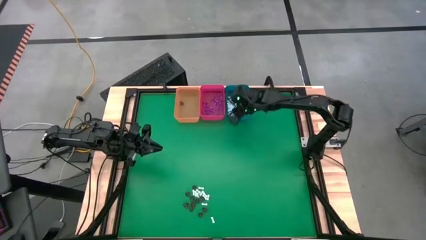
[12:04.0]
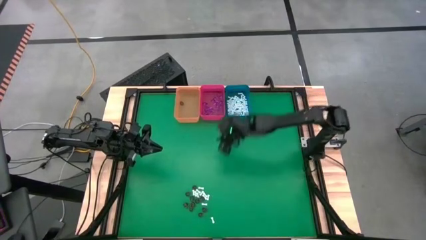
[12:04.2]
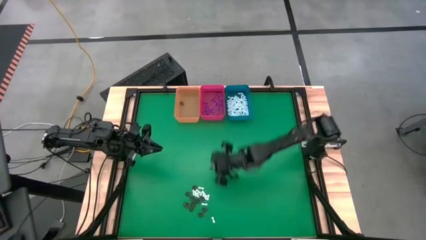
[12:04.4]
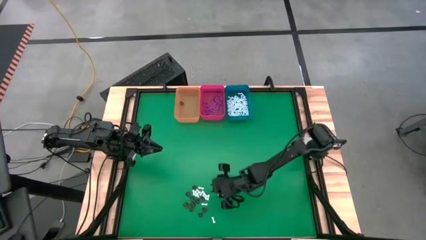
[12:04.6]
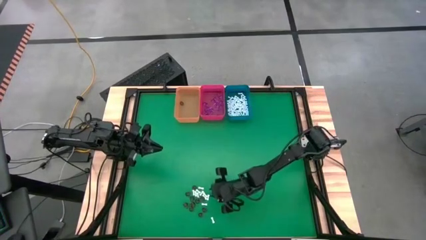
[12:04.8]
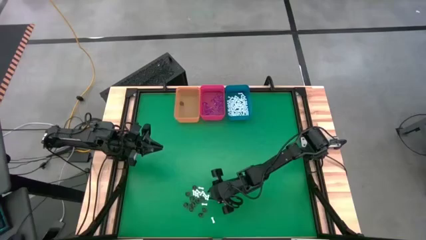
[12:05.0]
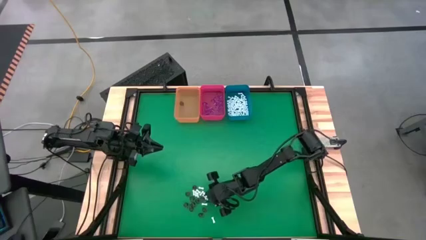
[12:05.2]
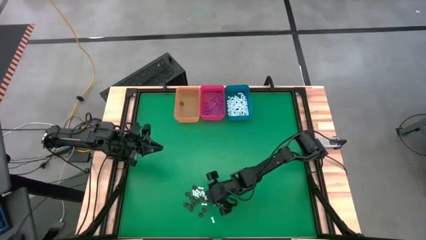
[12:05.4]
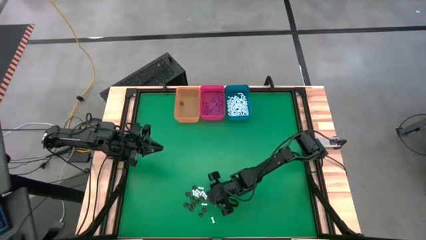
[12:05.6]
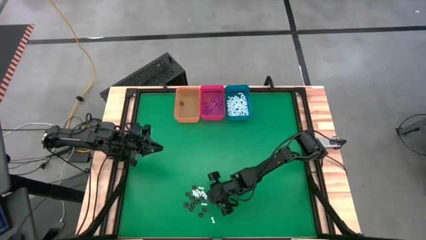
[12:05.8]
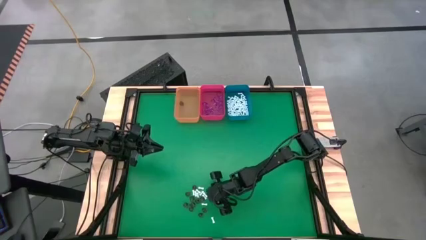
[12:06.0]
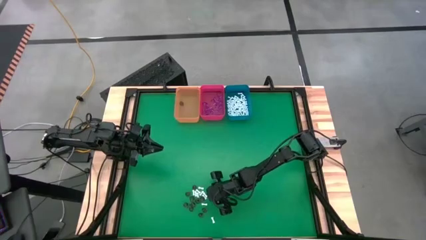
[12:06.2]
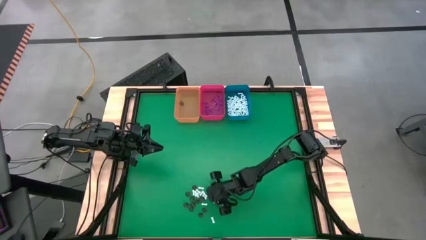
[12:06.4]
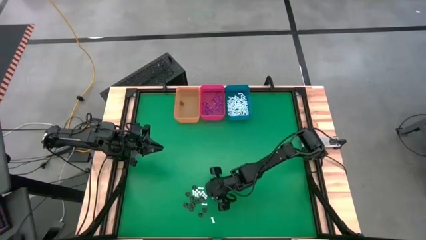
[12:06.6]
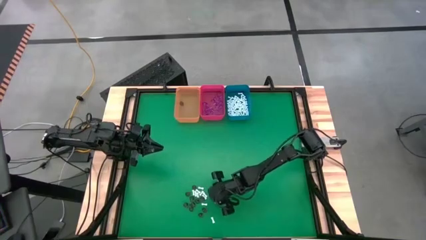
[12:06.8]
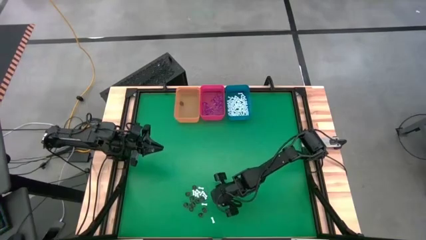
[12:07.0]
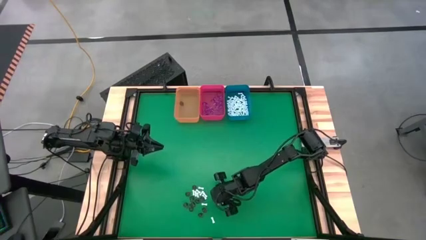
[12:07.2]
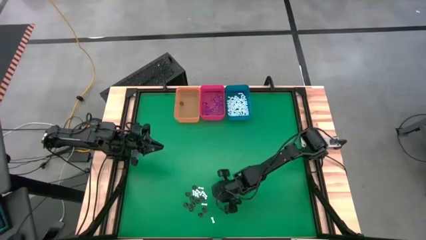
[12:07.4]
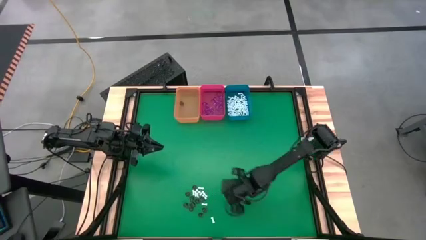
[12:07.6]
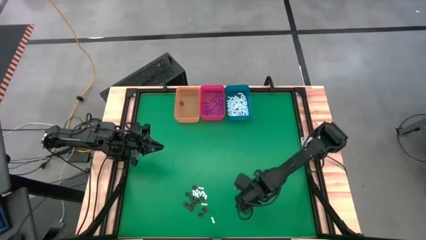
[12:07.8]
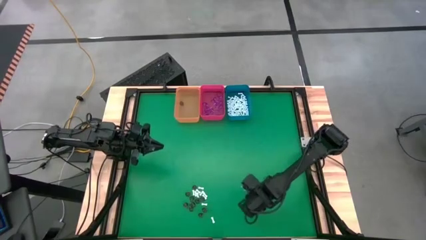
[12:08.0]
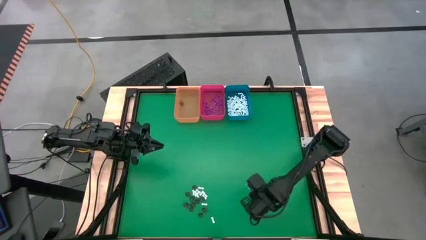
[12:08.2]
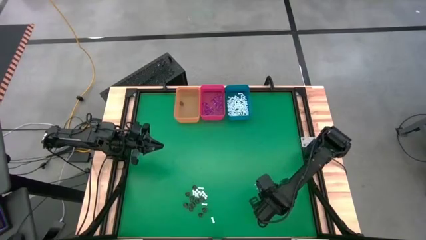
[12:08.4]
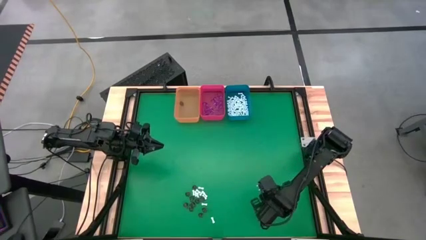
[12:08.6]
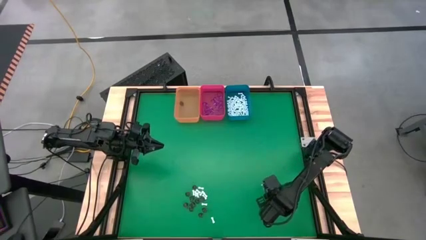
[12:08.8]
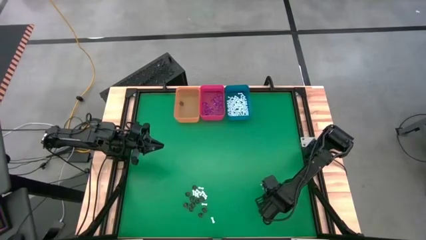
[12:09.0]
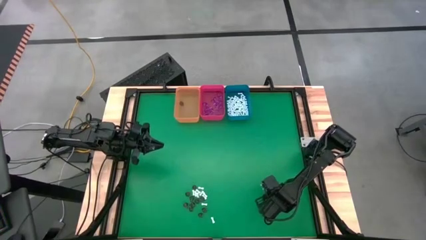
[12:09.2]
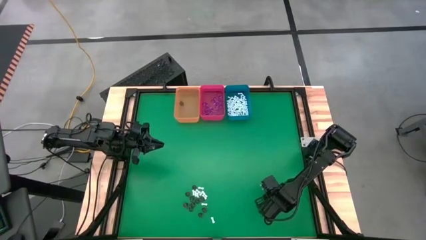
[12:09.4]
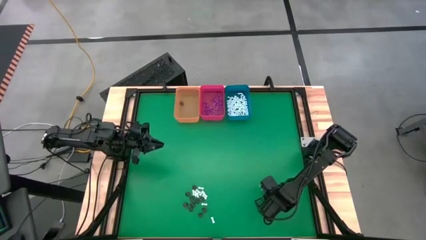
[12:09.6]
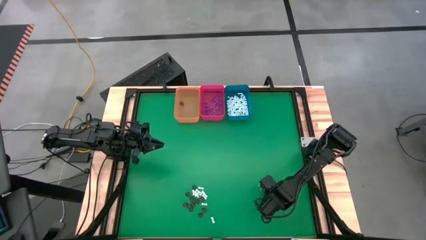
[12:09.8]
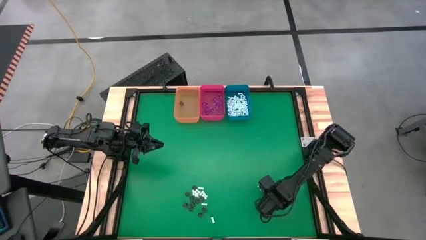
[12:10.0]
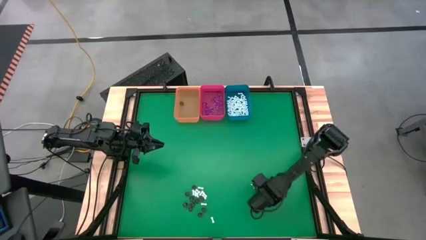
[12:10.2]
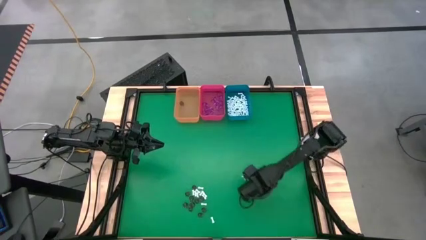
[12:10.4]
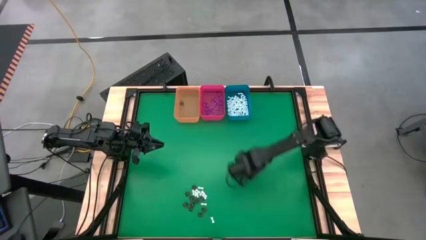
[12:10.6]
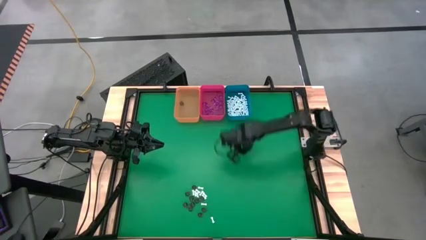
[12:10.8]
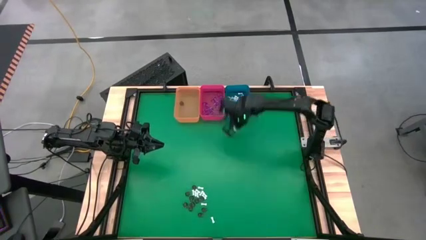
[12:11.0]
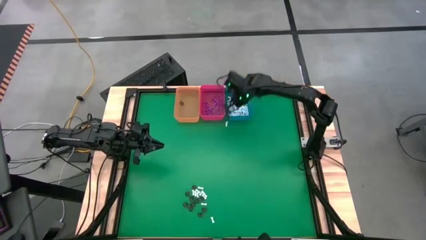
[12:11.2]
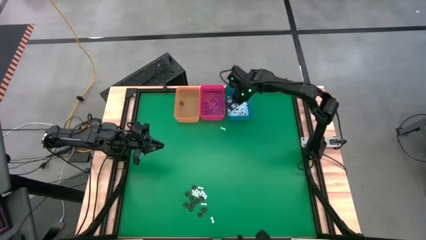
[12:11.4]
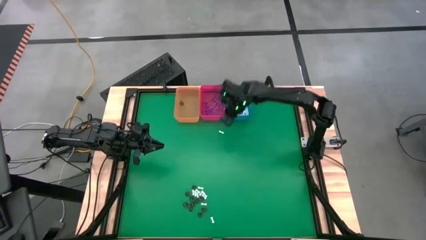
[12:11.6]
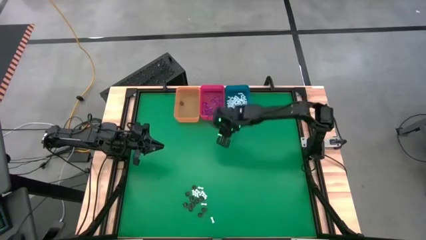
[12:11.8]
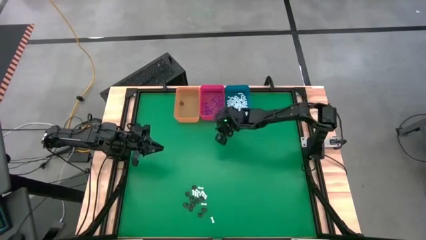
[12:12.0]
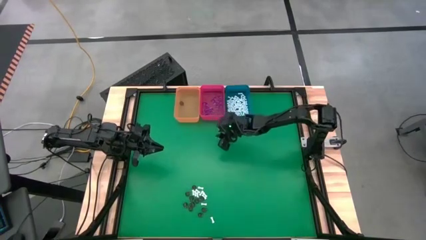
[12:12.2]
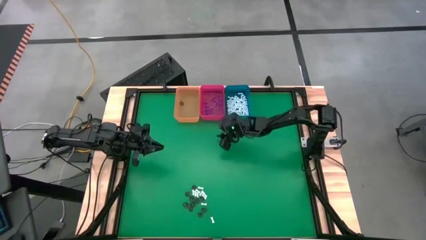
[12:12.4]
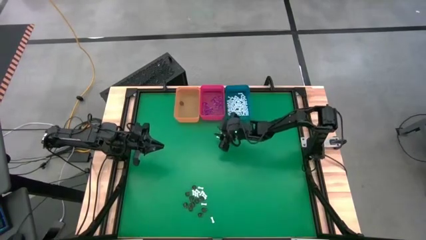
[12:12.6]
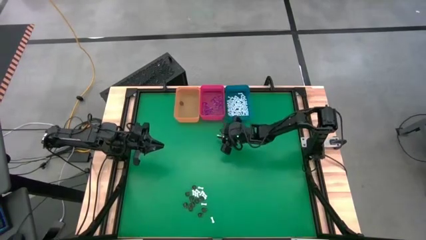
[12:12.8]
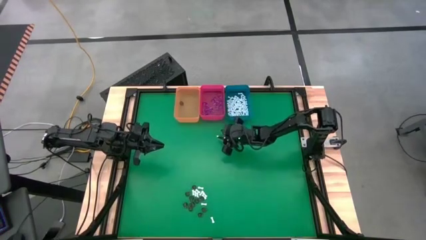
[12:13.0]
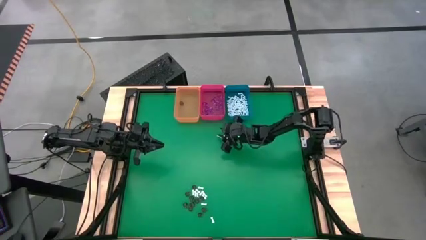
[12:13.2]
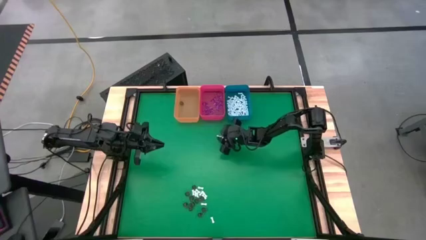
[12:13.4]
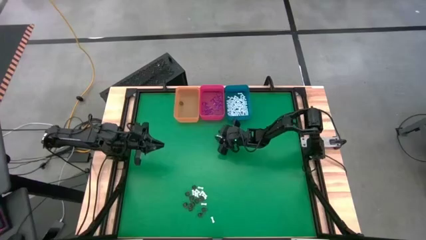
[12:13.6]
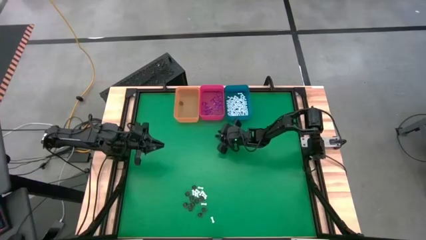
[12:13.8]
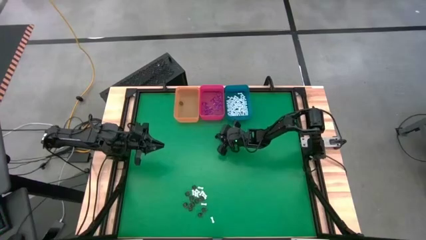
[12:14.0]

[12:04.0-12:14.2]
Task: Sort Halloween decoration
Put the white bone toy into the blue bin

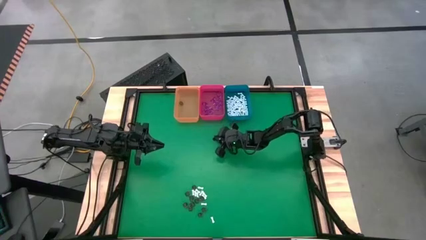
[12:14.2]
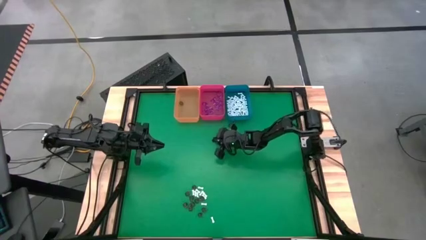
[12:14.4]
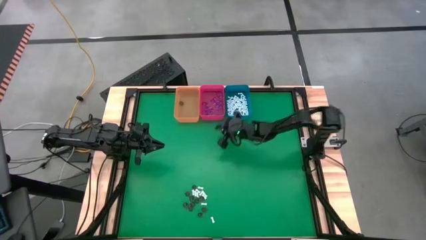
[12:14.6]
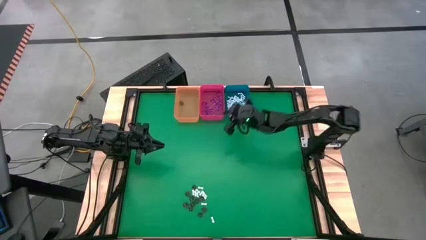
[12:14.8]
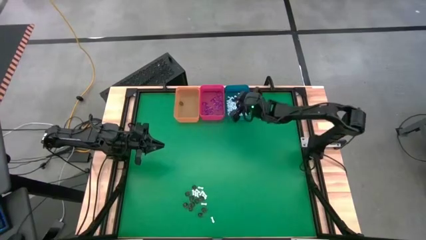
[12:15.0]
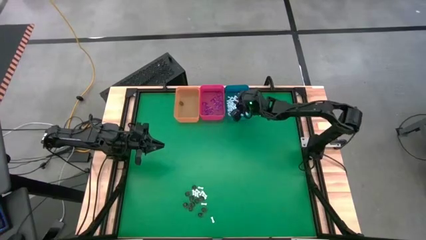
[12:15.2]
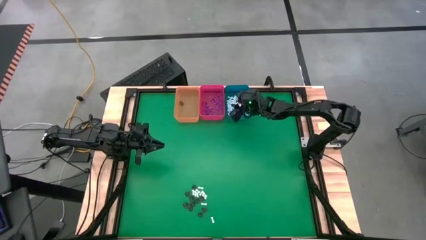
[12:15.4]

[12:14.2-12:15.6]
Put the white bone toy into the blue bin

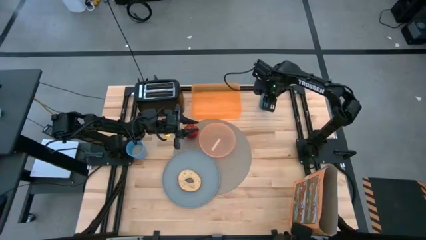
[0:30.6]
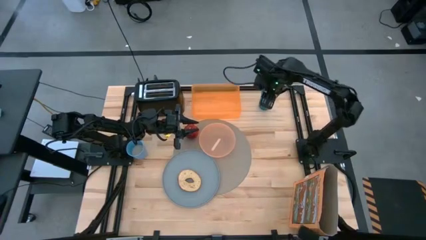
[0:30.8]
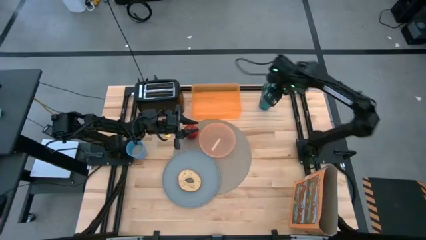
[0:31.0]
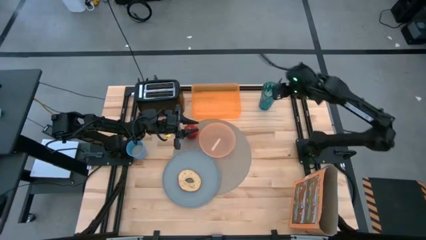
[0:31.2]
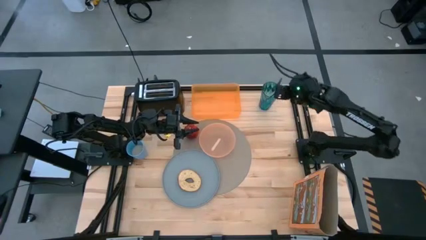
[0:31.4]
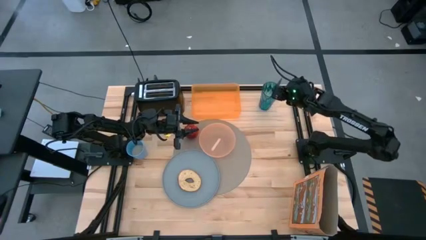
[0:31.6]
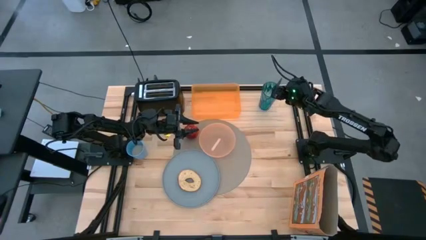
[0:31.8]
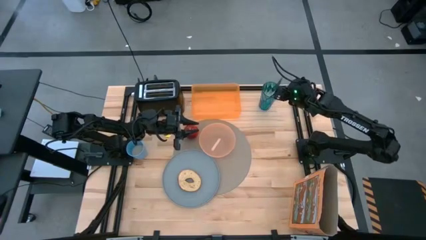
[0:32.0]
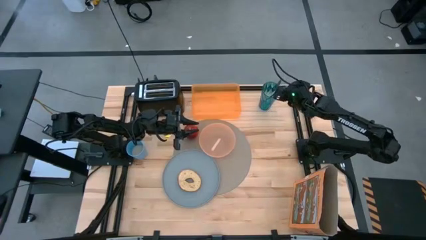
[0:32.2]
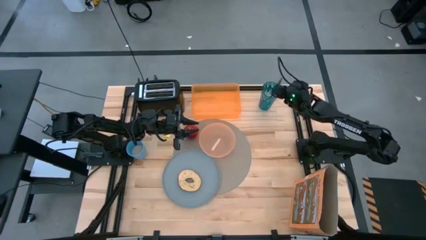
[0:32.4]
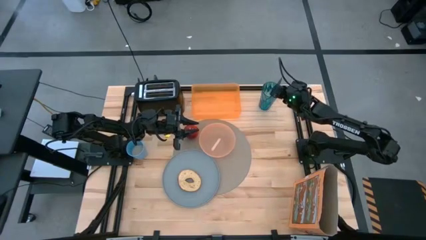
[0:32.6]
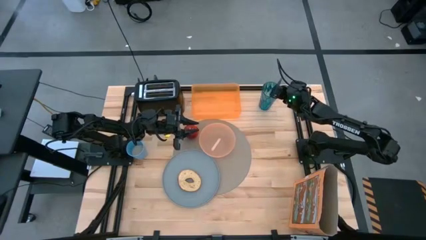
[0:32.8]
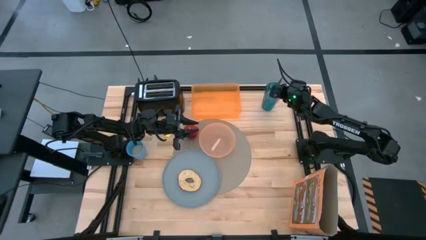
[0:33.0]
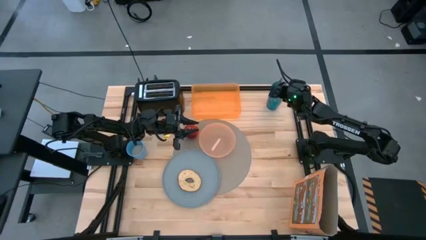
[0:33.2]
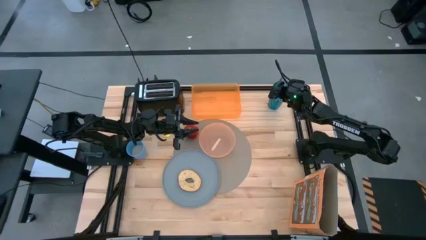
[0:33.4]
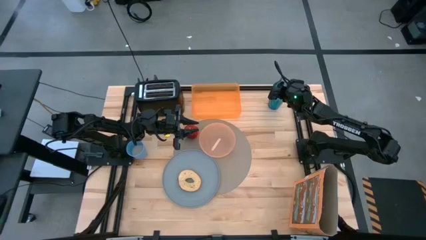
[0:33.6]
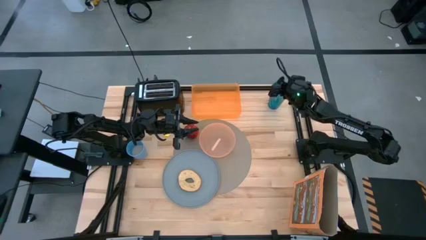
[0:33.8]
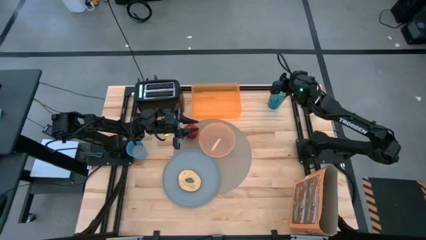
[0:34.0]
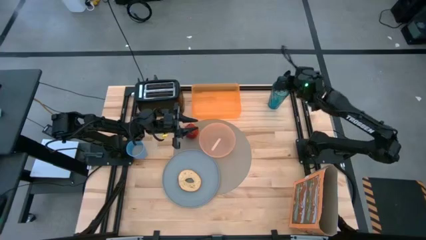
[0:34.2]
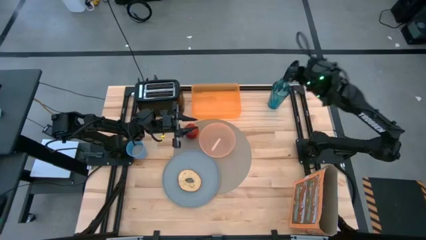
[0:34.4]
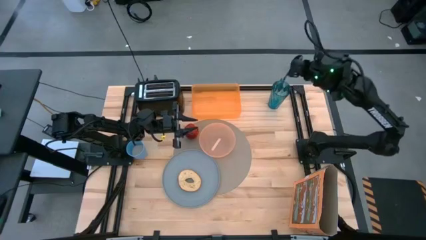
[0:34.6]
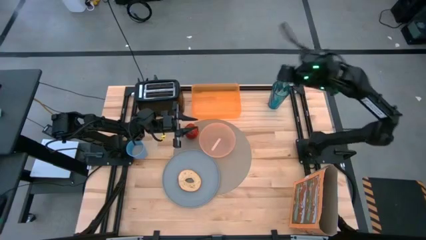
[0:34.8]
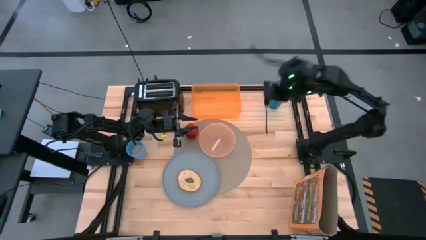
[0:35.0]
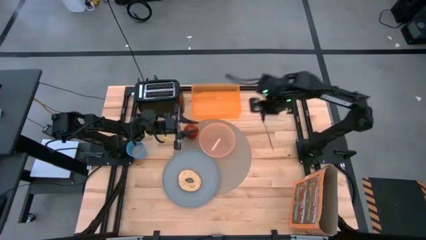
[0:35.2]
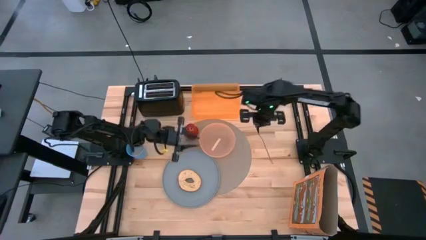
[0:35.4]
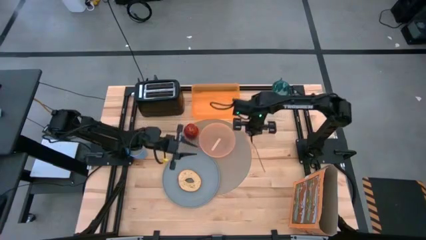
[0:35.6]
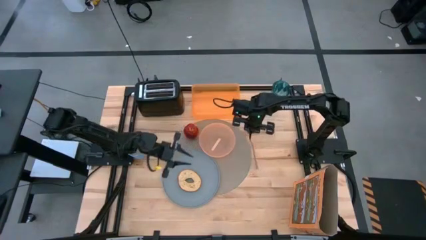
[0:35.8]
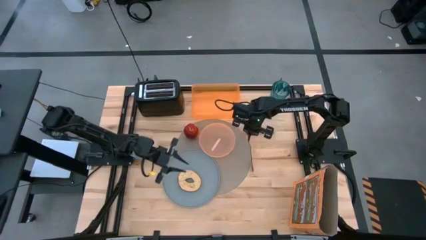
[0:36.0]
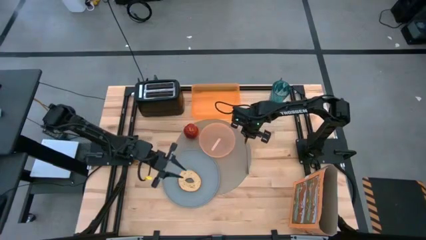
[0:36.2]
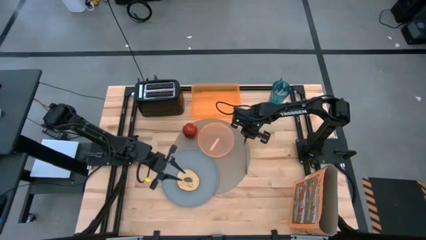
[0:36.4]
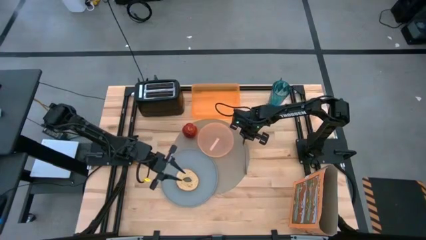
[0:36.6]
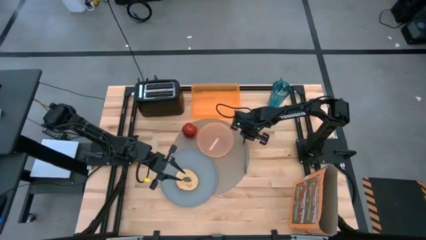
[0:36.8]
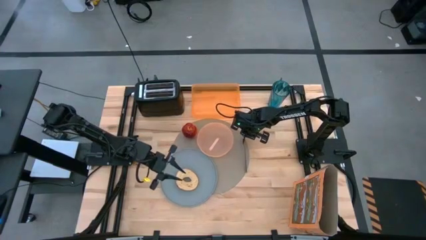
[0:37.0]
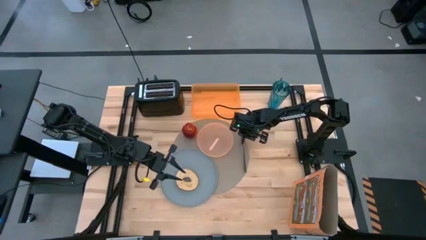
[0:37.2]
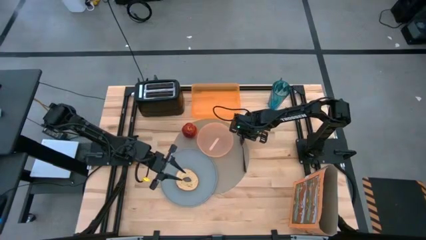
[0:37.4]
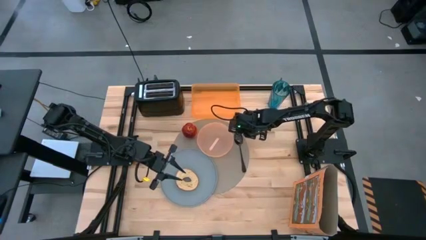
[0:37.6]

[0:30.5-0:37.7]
Task: Arrange a breakfast setting
Put the black spoon on the gray mat
